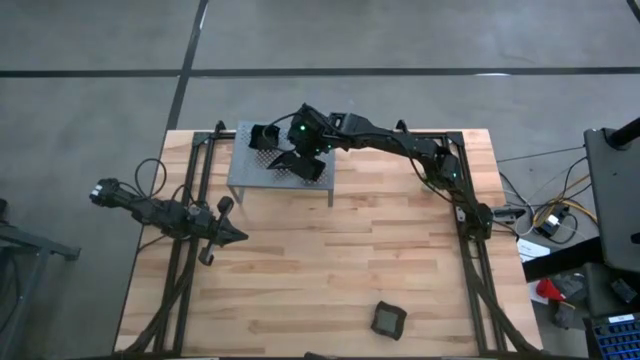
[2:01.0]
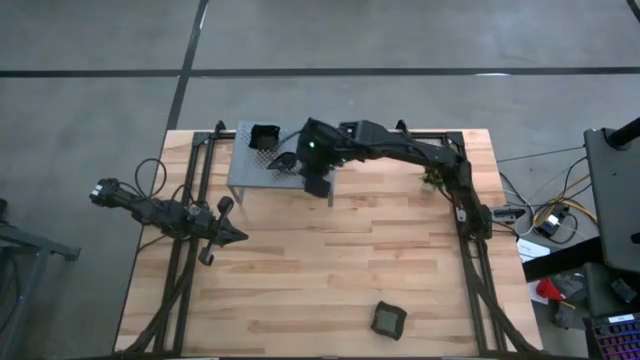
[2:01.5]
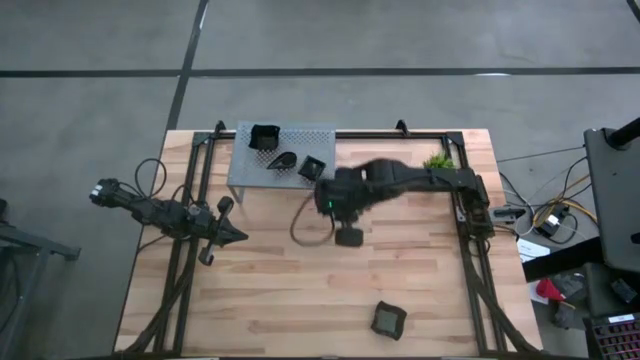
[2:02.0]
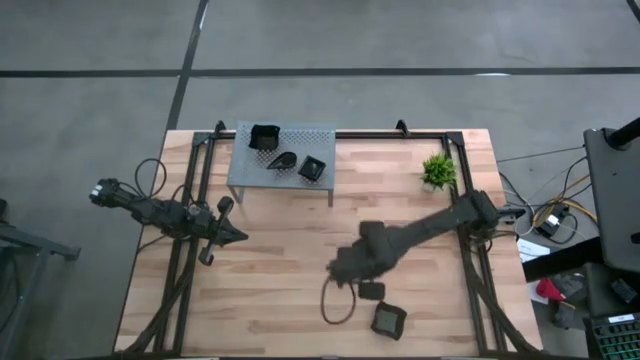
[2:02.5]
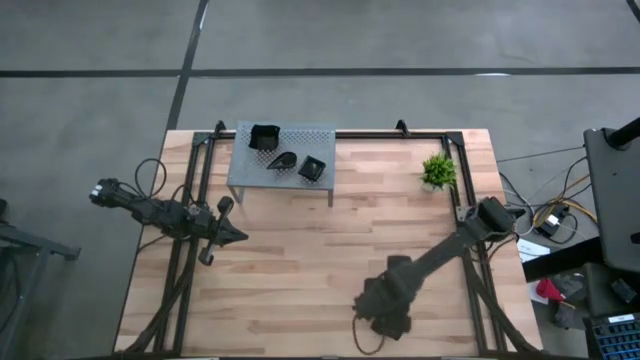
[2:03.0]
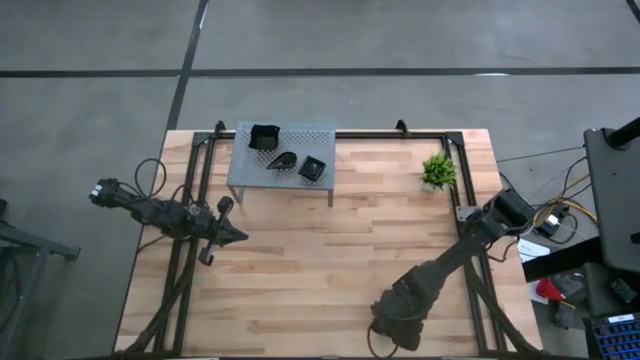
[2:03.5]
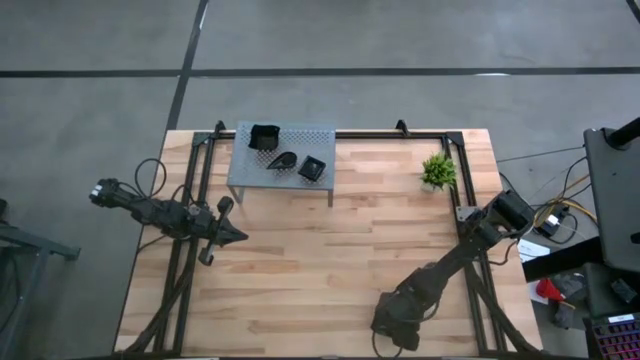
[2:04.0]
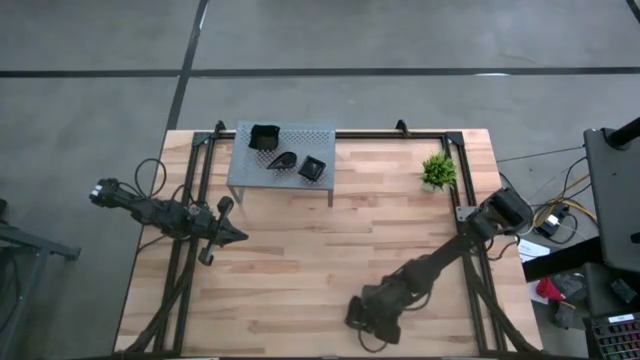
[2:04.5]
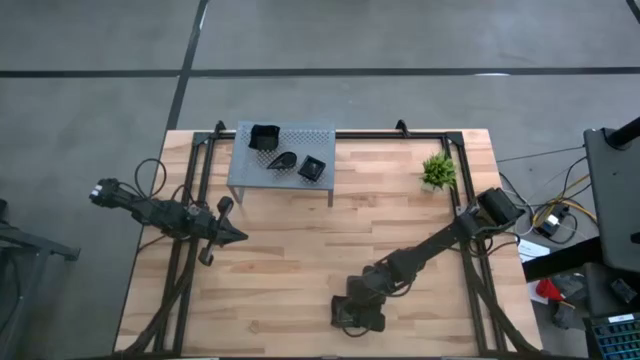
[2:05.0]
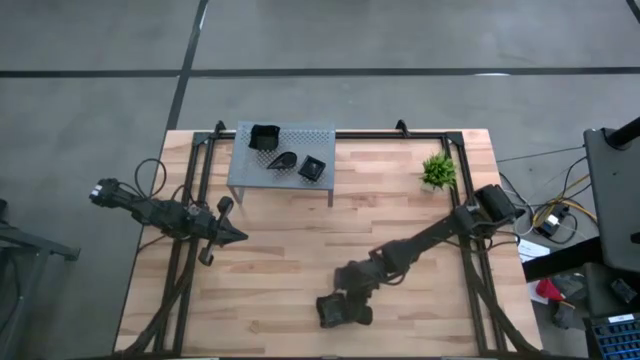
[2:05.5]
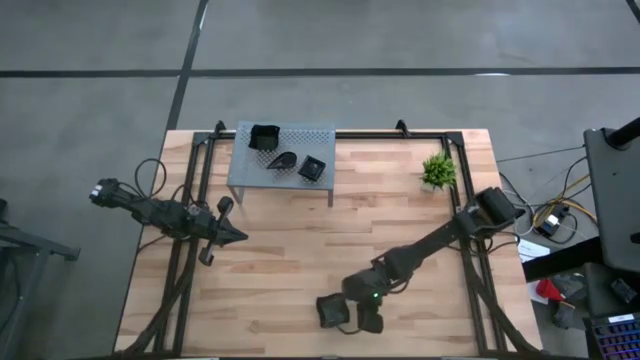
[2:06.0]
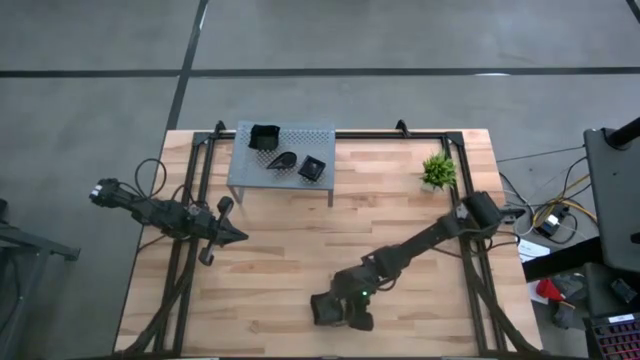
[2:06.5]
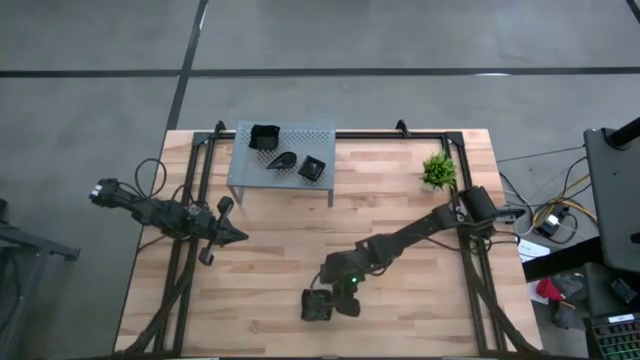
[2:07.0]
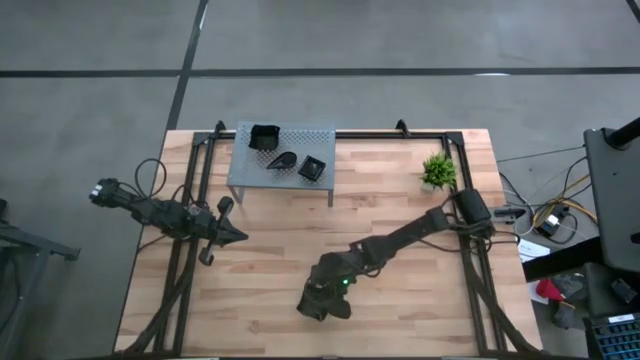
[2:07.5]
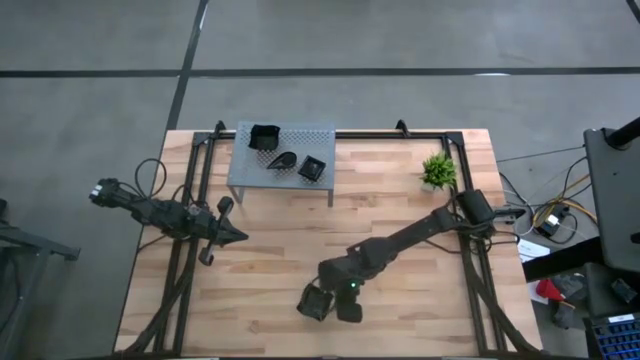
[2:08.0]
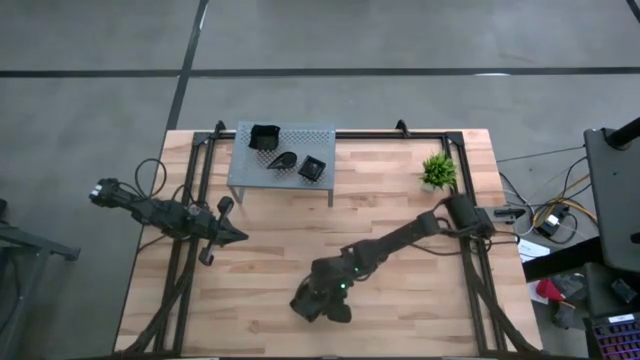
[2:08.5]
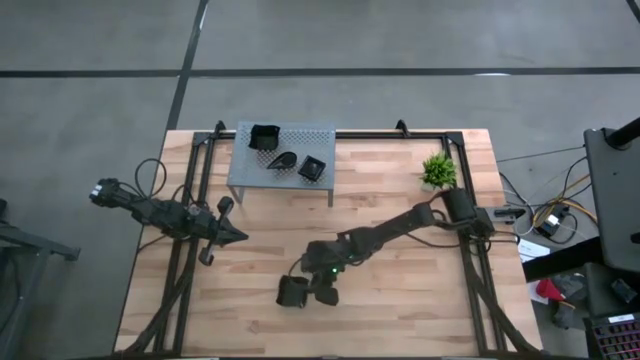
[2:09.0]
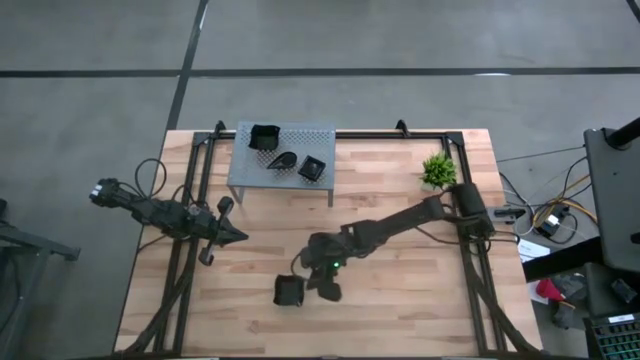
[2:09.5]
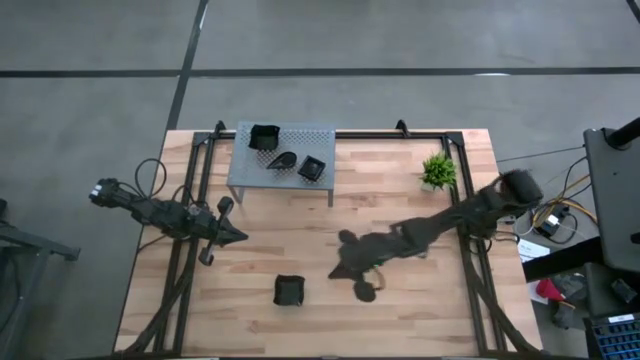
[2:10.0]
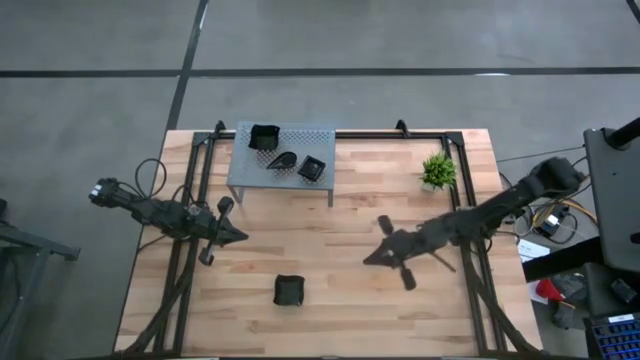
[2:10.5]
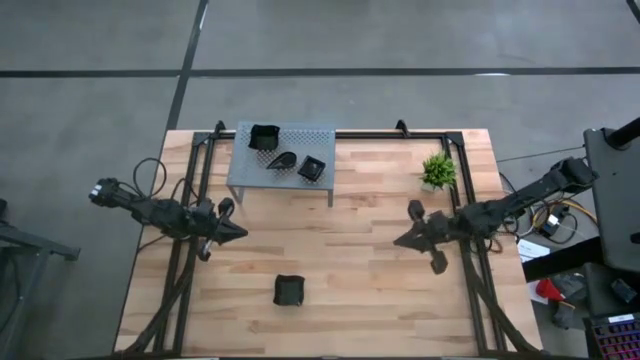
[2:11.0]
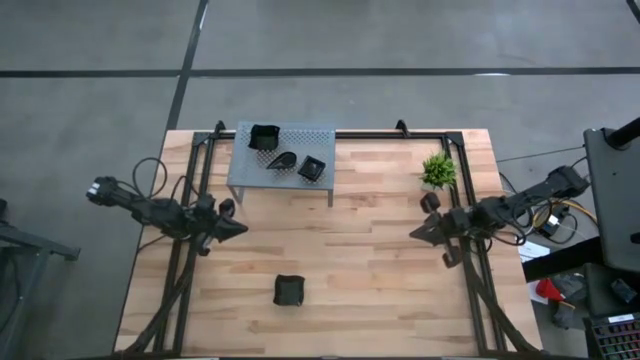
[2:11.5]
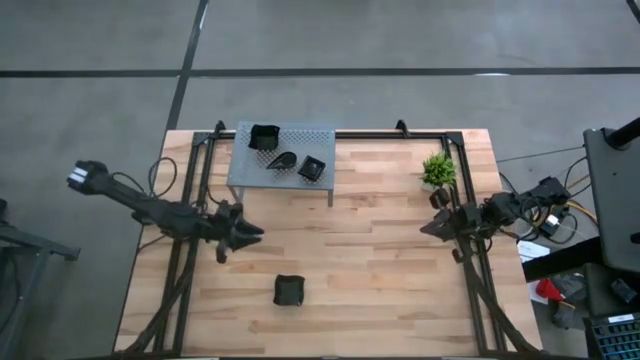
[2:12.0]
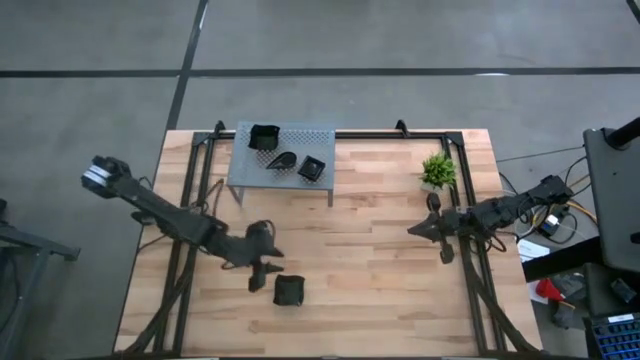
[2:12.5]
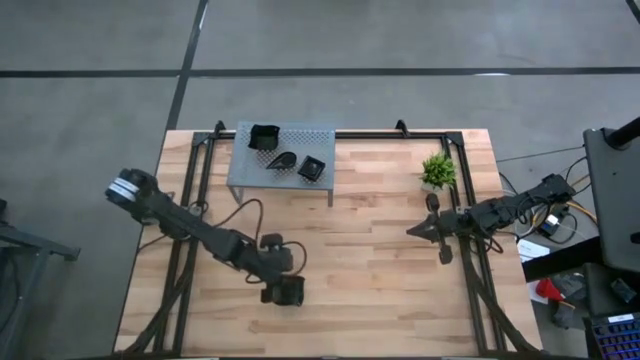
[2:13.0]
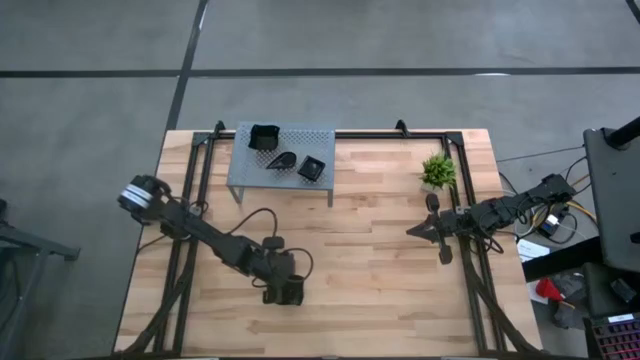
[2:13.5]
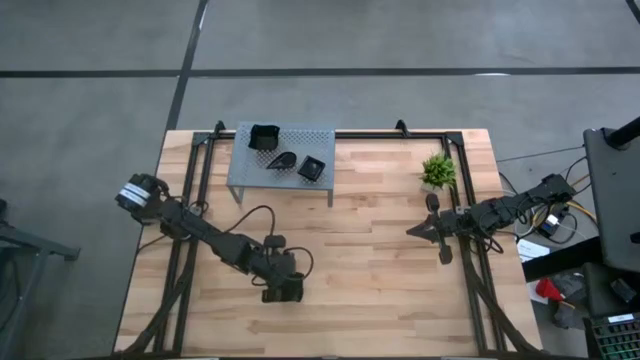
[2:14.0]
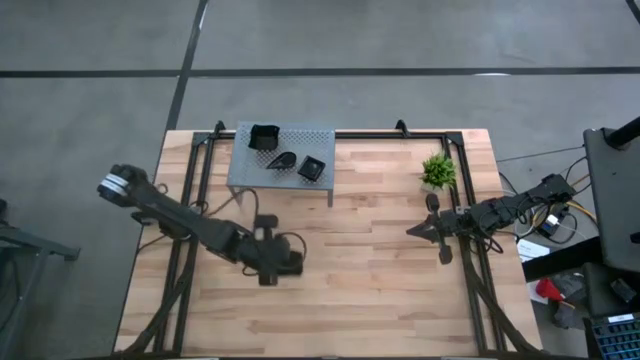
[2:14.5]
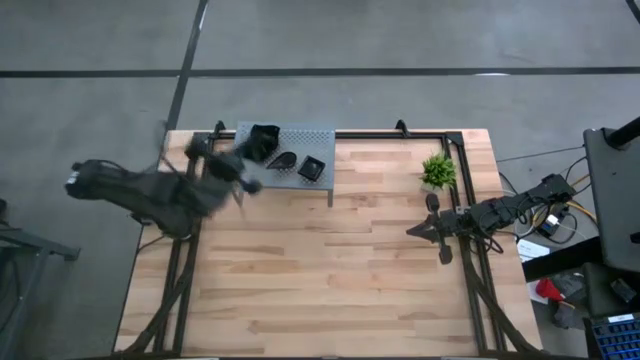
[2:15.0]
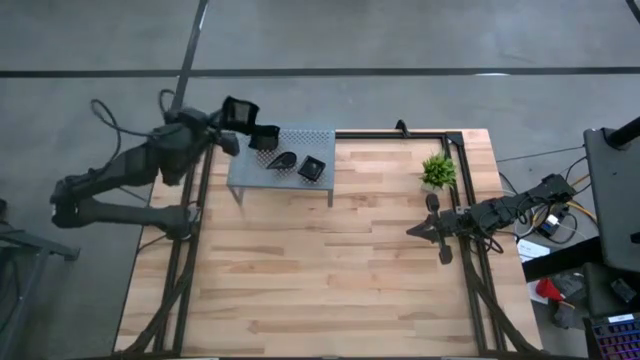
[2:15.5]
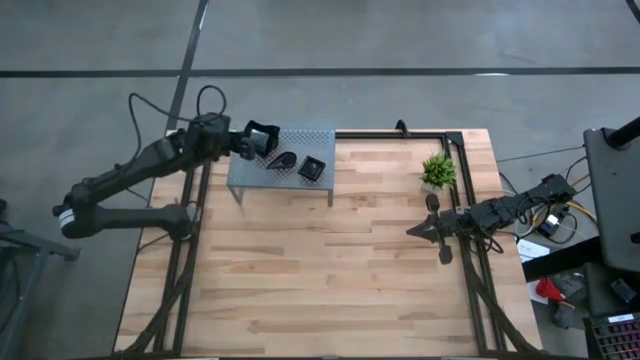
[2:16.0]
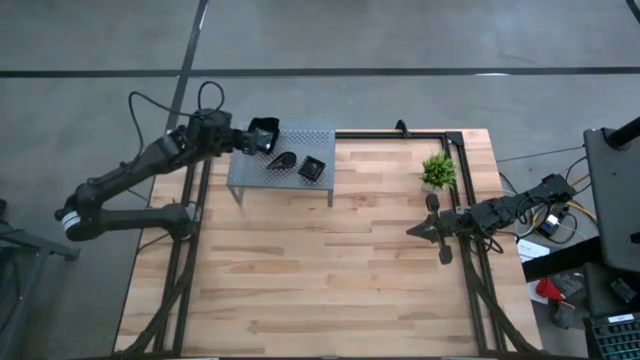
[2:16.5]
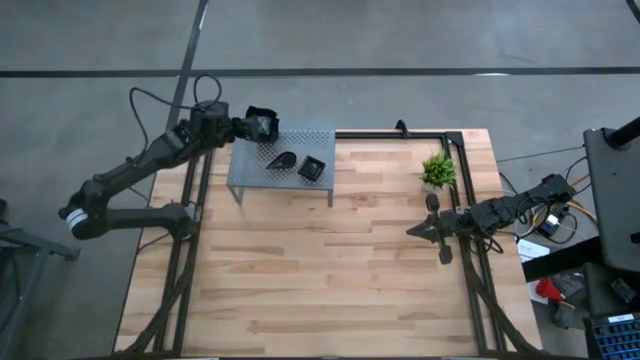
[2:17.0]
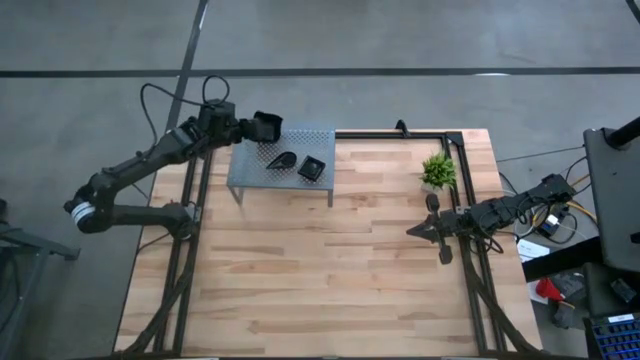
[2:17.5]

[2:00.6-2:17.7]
Task: Pick & Place Mini shaped plates
Stack the black distorted square plate on top of the black distorted square plate on the shelf

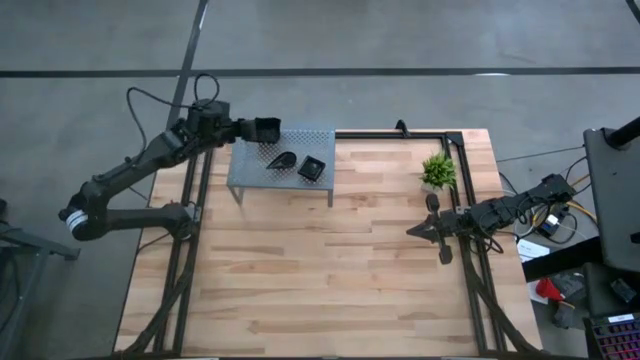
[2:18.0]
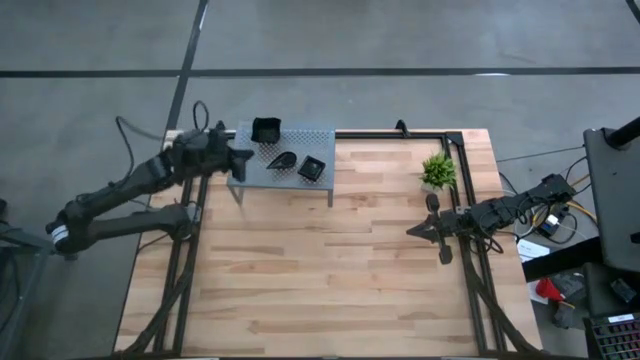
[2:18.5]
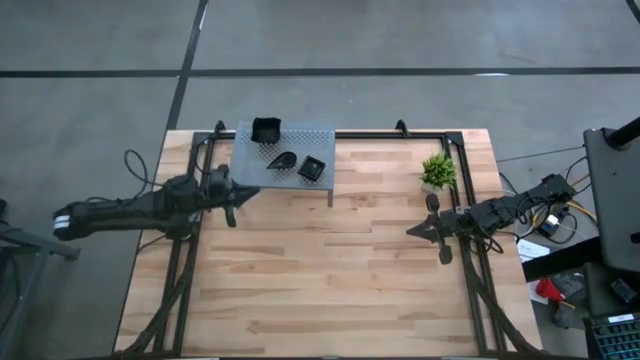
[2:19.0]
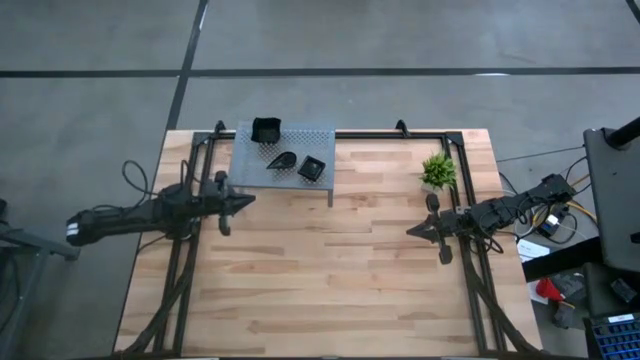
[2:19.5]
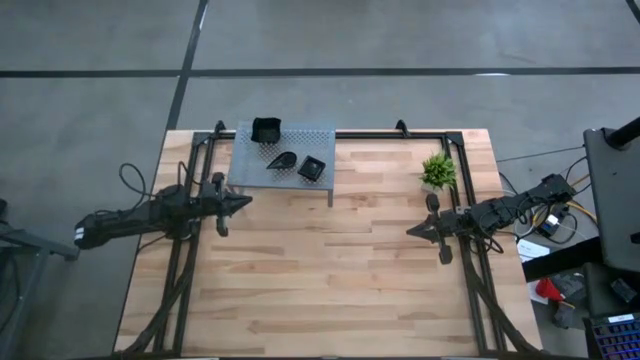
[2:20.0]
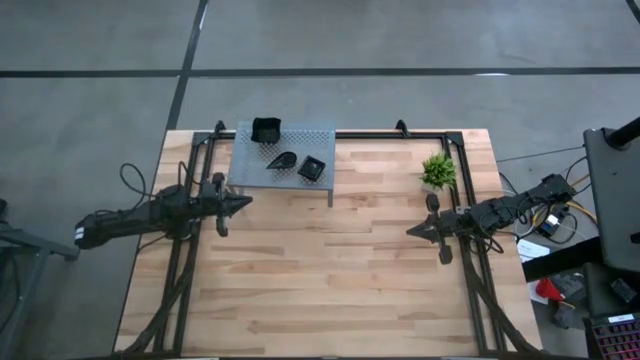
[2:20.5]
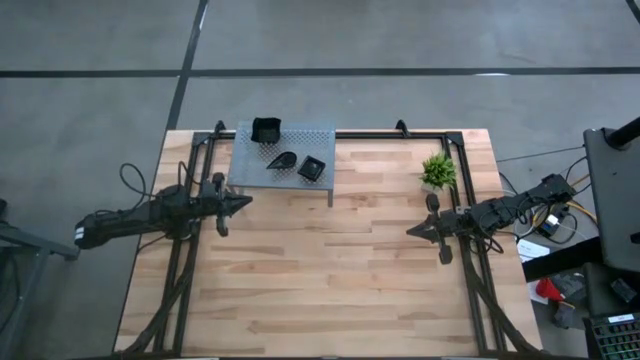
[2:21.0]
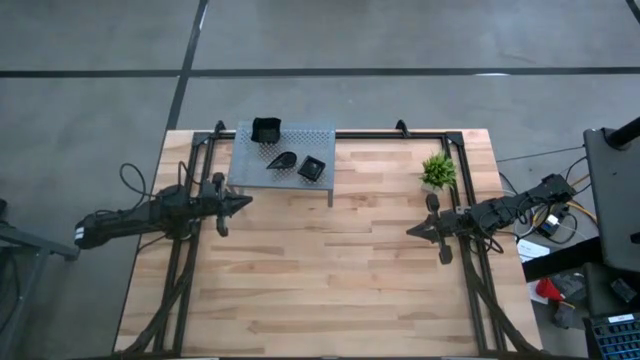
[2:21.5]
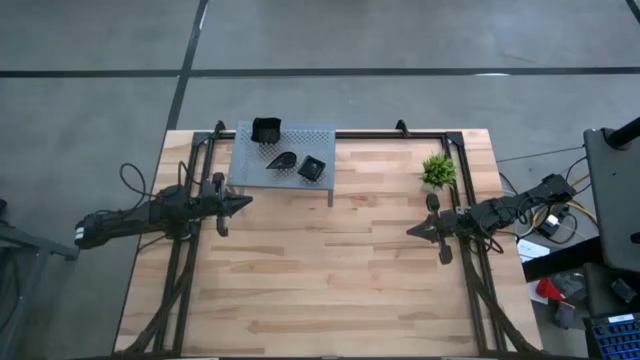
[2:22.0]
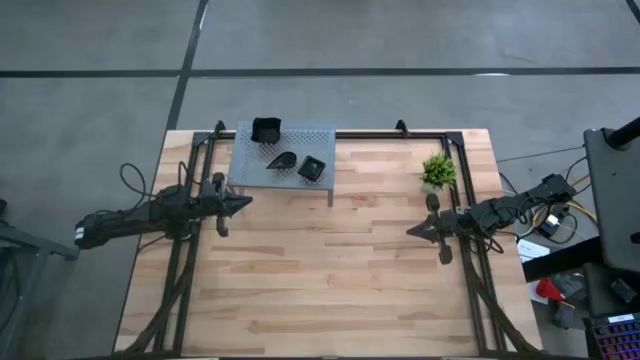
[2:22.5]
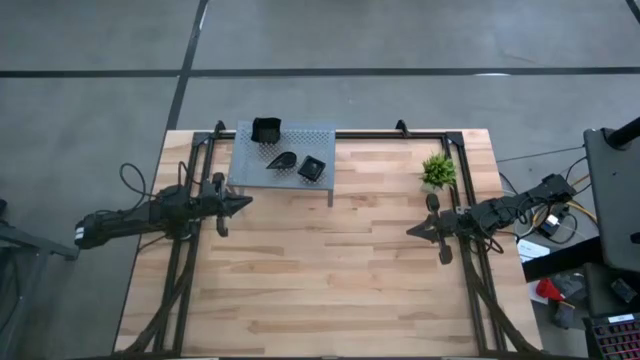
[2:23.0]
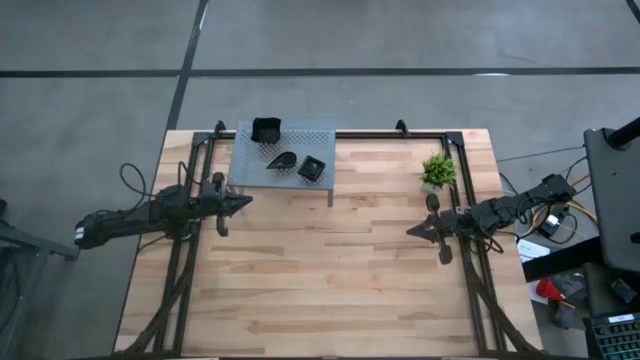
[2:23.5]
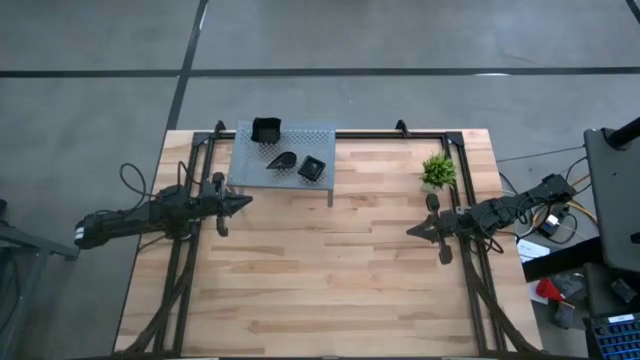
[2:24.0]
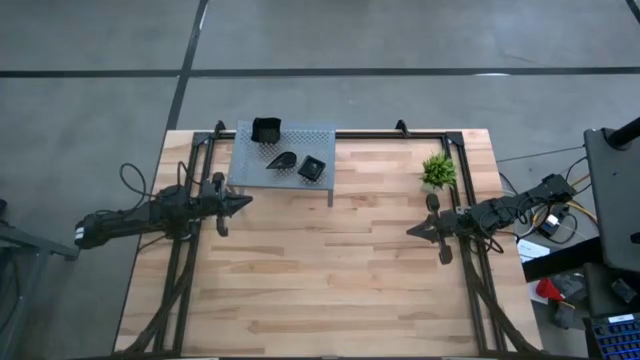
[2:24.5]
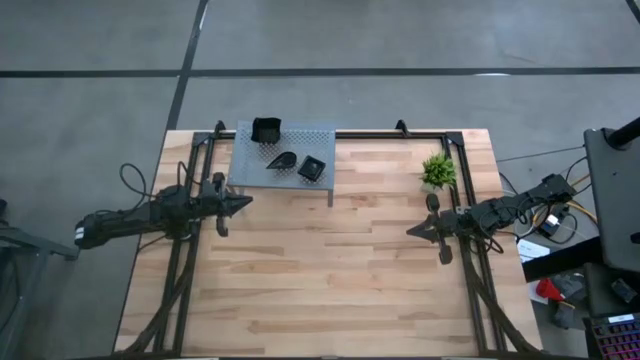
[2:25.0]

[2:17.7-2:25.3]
Return to Home Position
